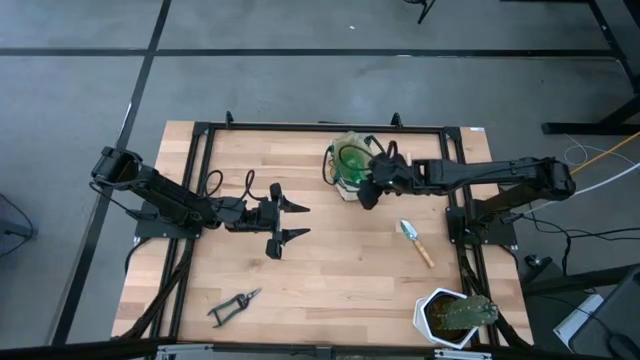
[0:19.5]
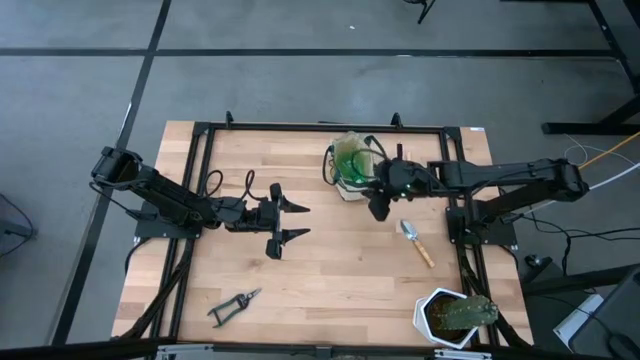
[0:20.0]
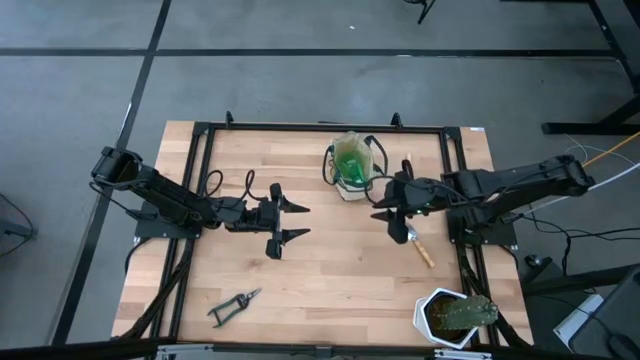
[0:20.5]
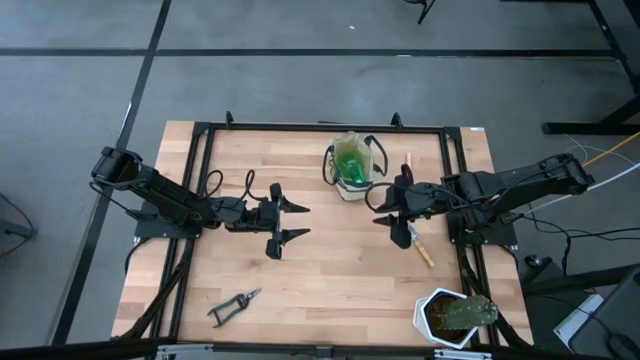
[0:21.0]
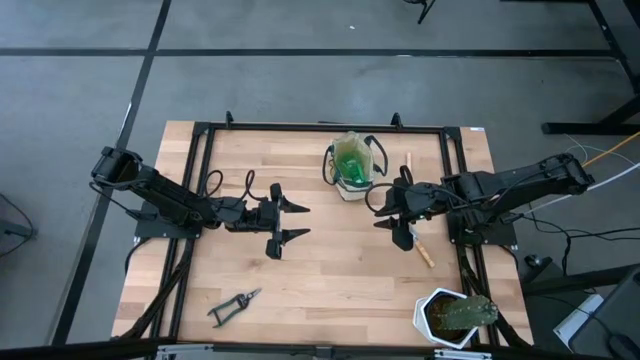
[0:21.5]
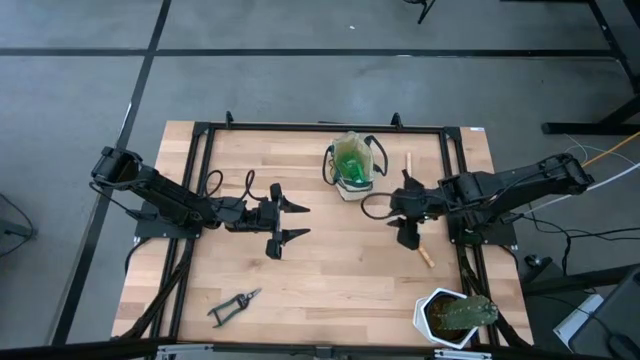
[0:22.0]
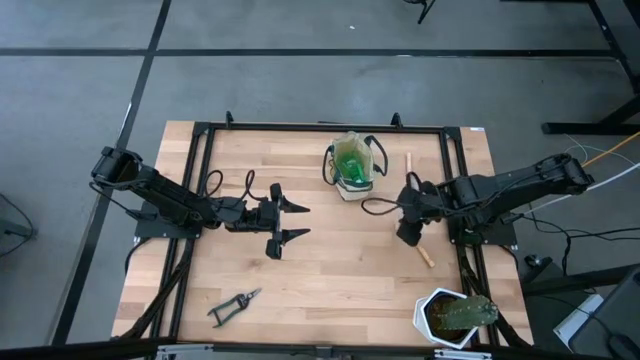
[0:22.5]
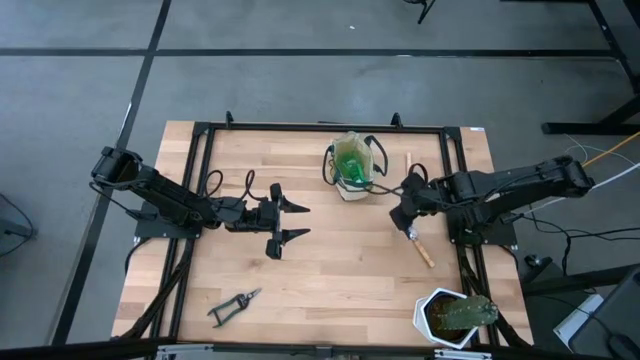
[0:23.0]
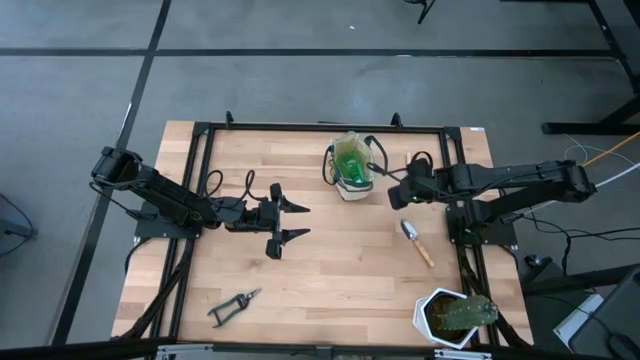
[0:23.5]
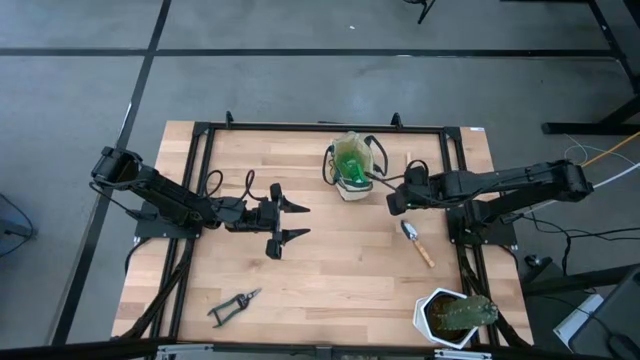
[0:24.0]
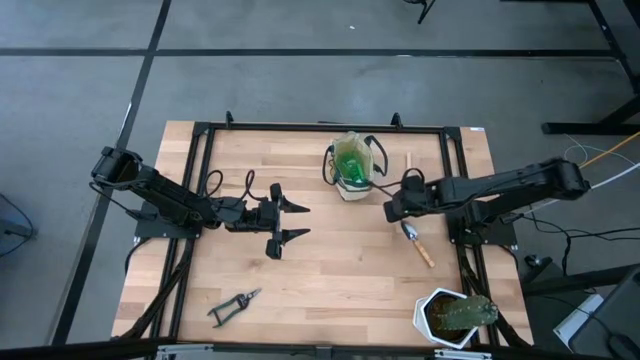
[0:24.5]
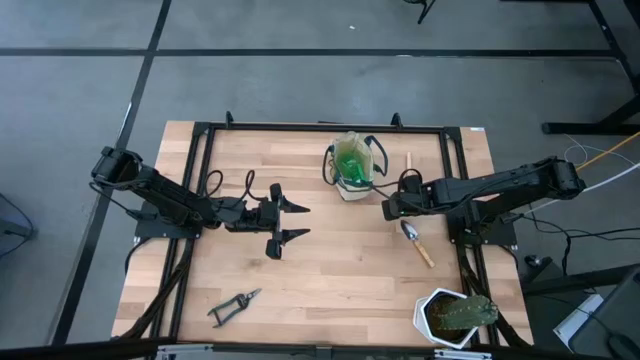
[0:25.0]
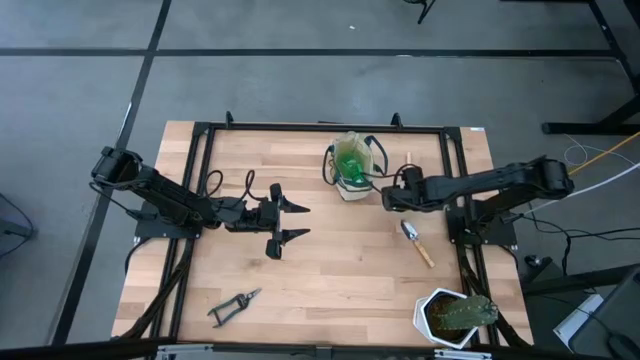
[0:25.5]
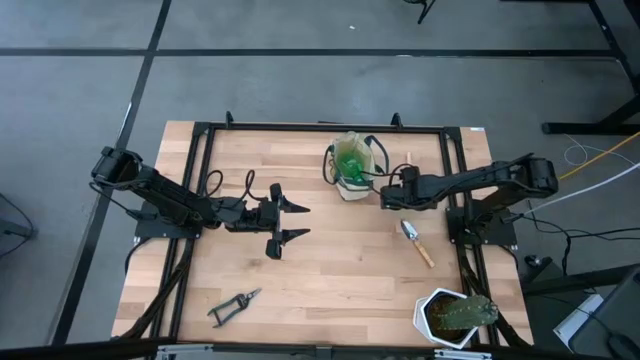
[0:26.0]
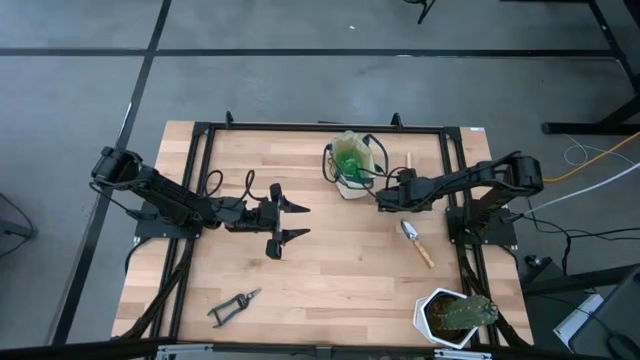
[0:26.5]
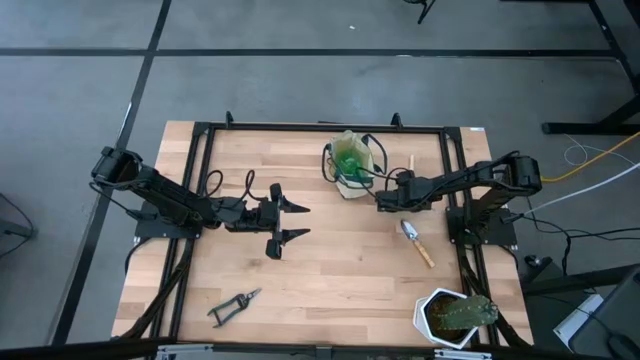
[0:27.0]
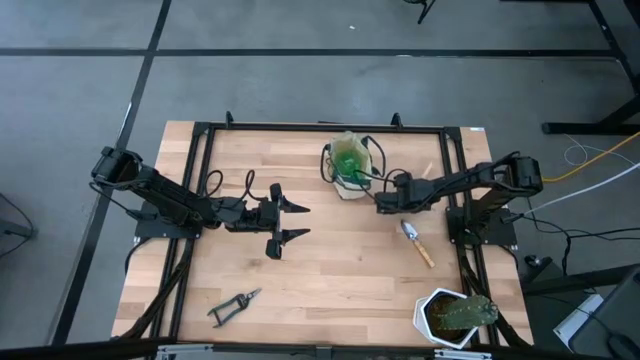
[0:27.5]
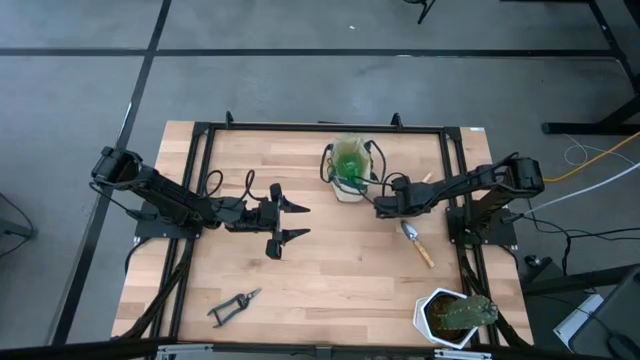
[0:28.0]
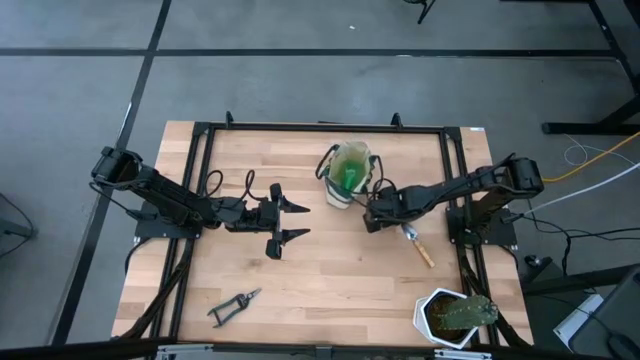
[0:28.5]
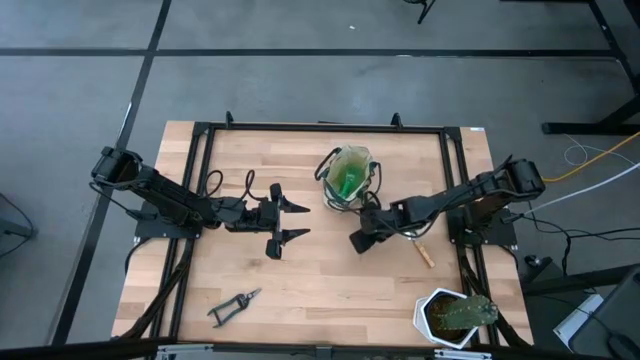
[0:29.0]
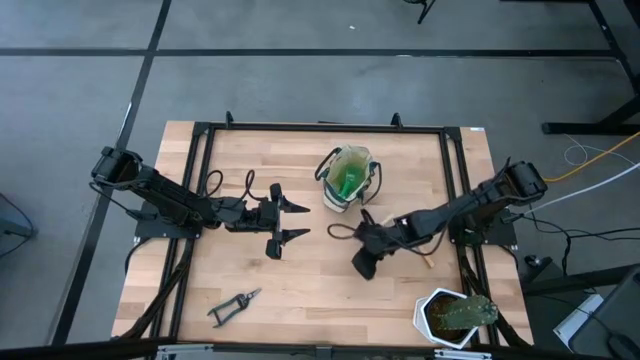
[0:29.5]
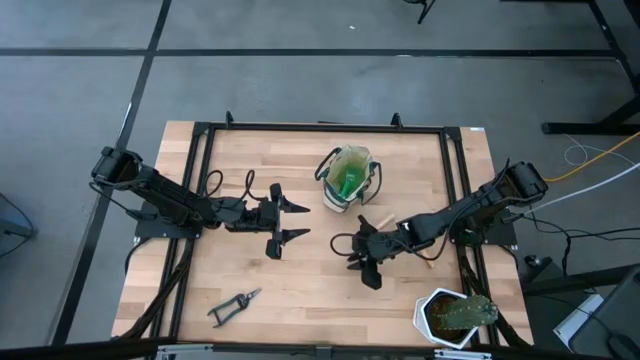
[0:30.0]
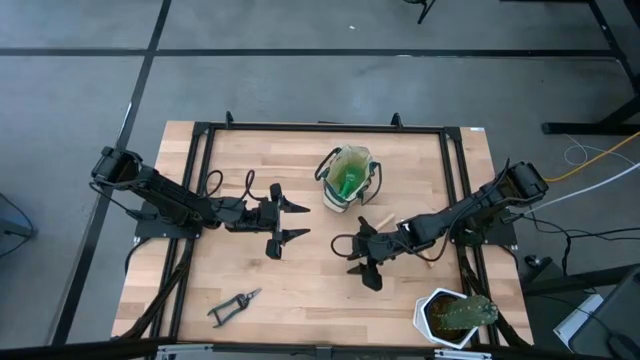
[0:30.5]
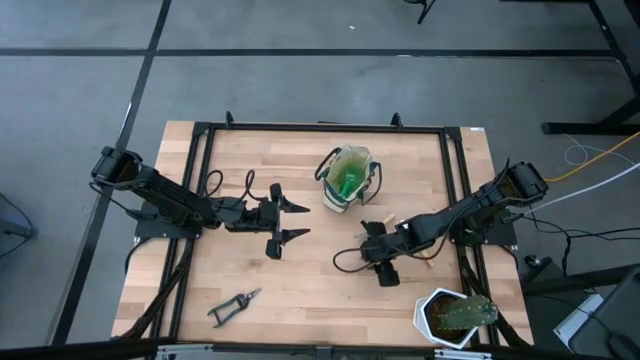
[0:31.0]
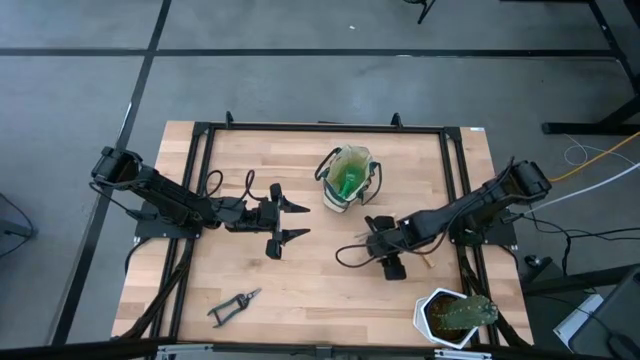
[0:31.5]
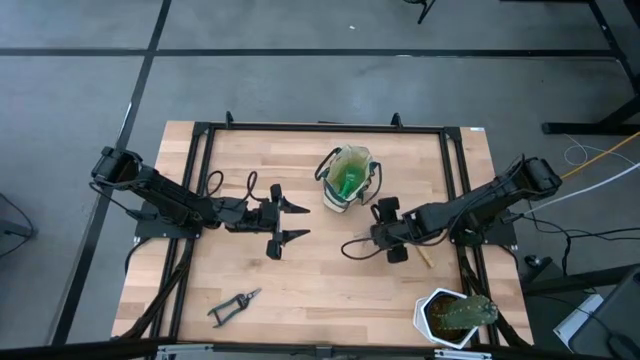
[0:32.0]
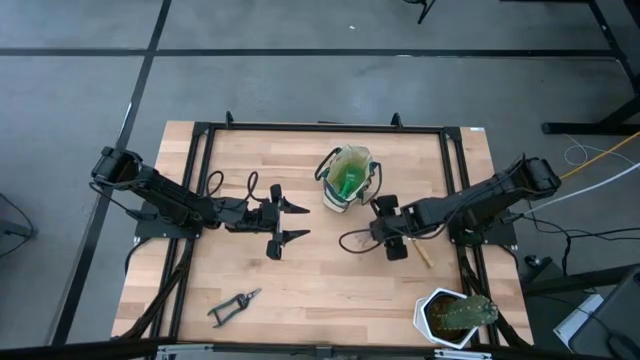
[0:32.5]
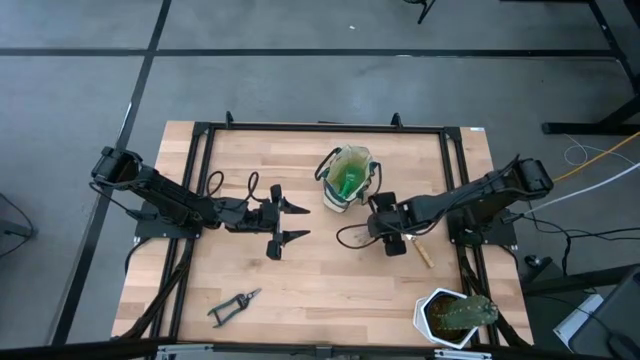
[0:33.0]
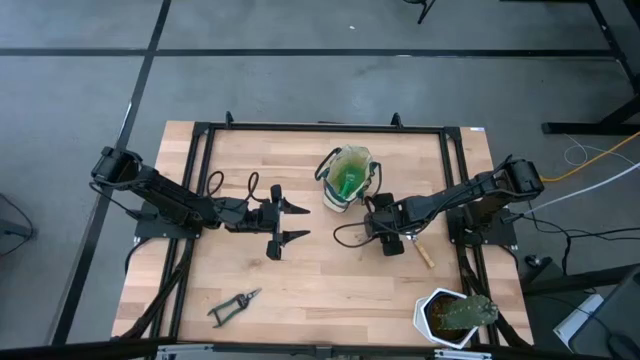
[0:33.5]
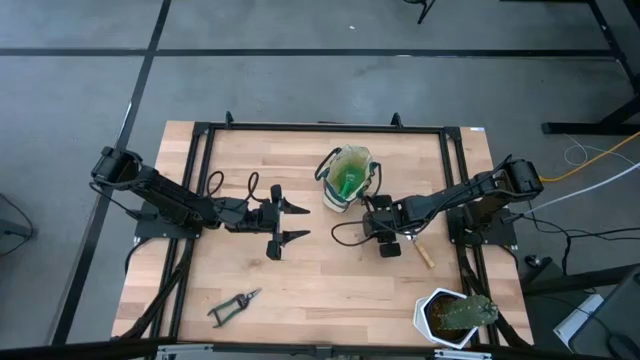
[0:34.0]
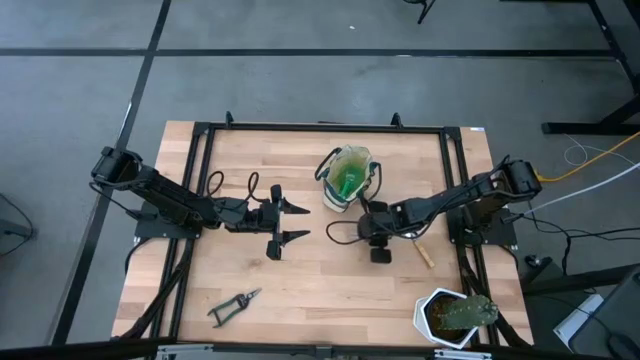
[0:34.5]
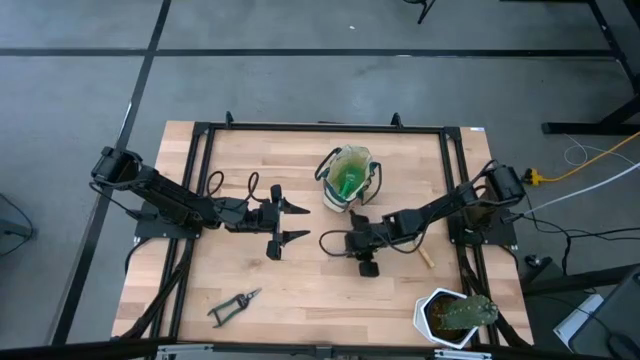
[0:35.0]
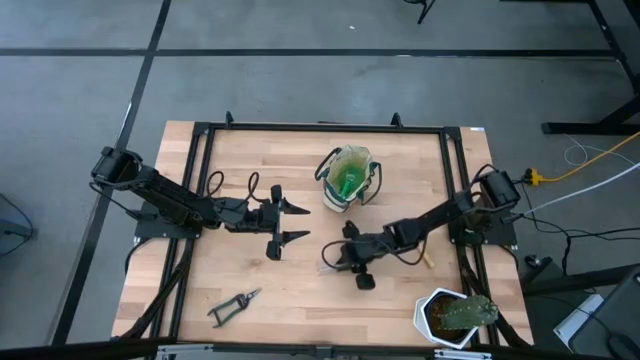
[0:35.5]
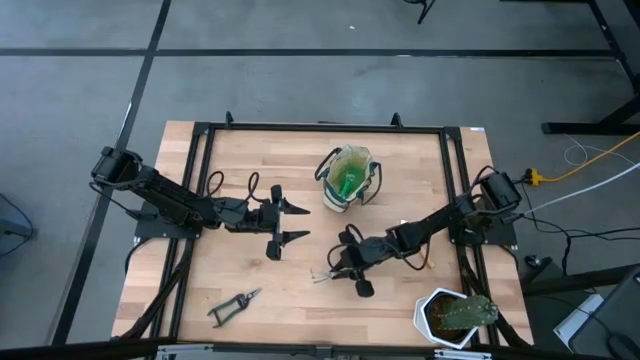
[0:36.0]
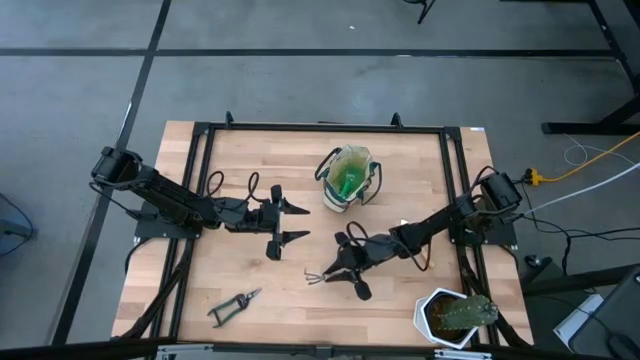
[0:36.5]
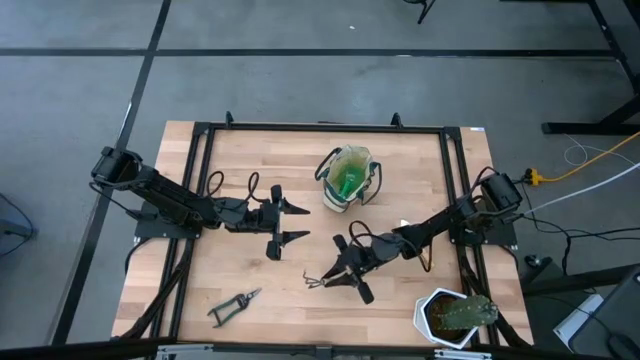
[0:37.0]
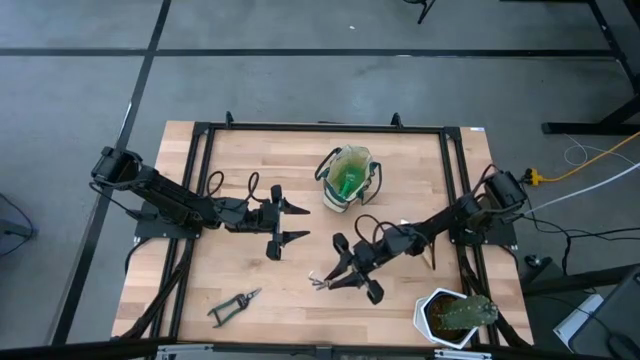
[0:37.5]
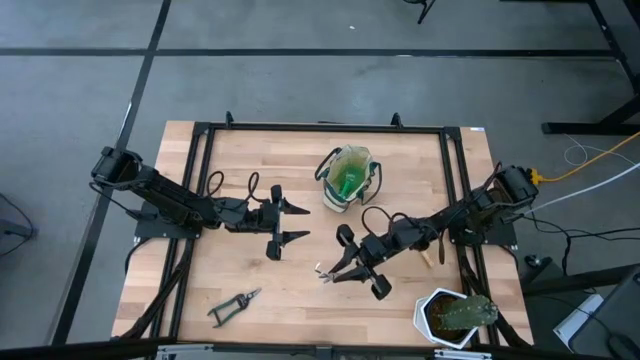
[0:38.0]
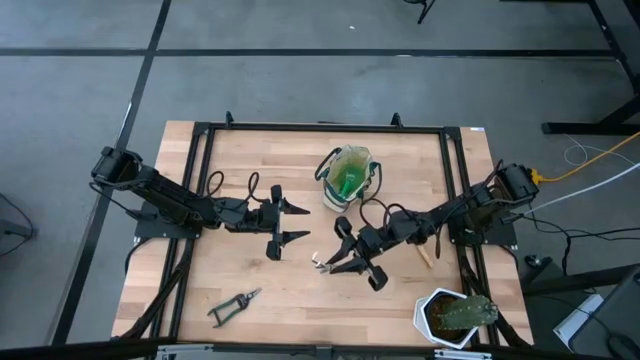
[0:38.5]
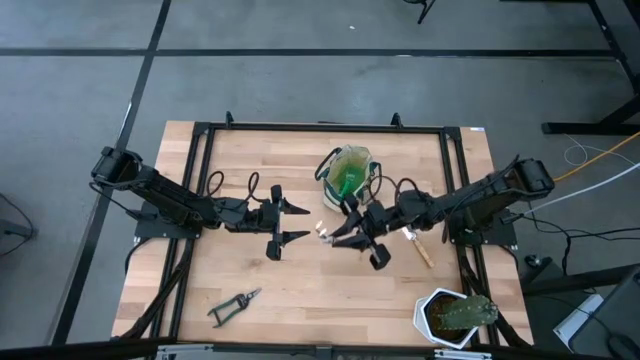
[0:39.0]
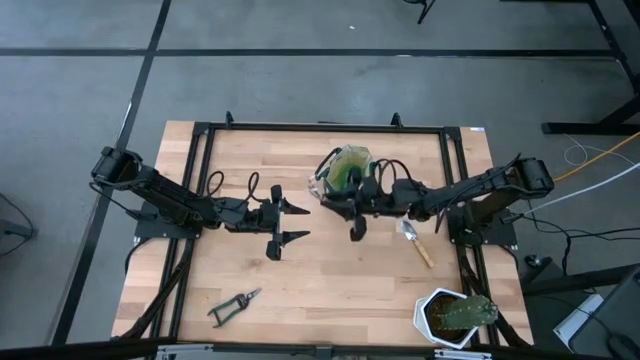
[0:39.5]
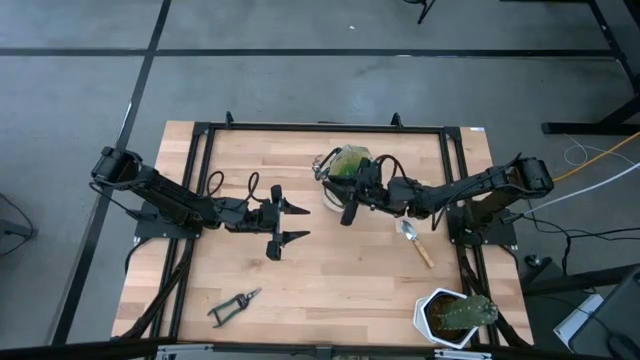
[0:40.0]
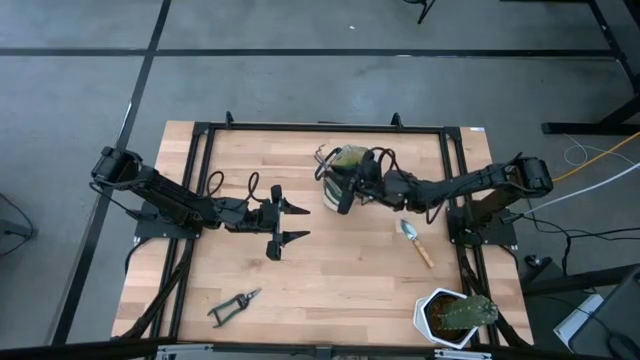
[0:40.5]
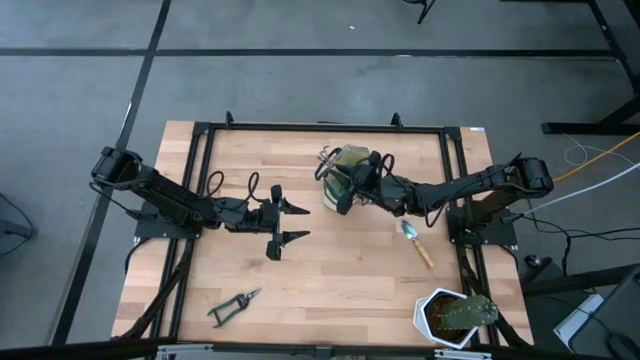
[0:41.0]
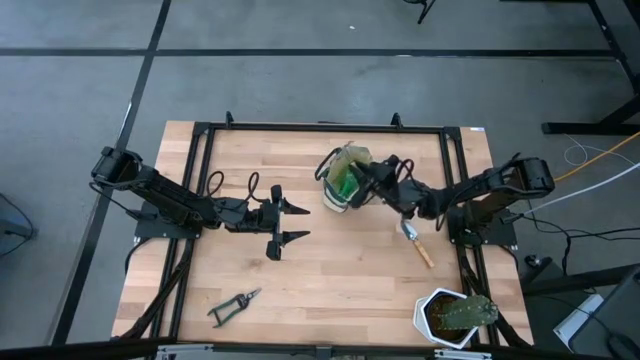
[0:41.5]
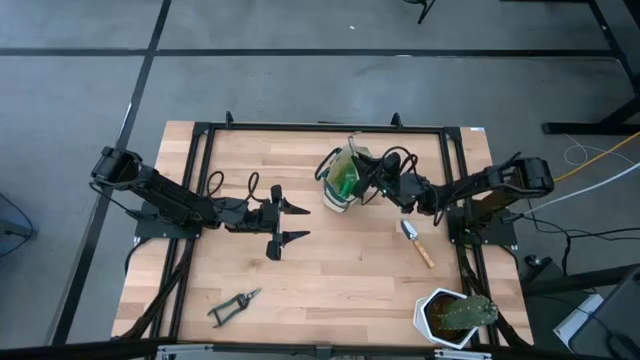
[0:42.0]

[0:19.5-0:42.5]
Task: Pick & Place Garden tools in Gardening bag
Put the hand rake into the gardening bag
